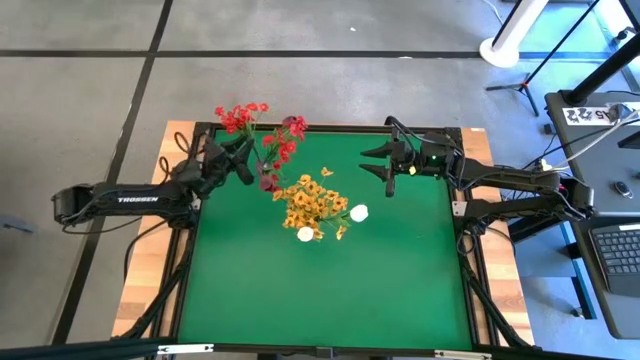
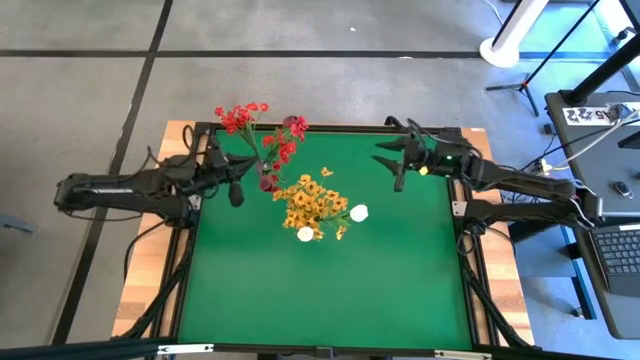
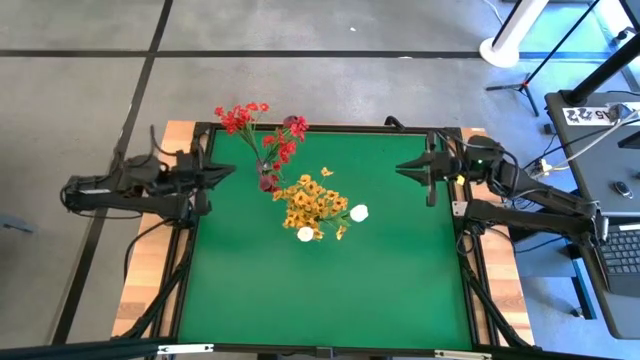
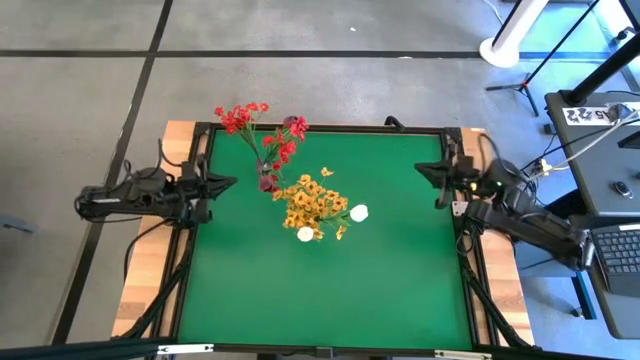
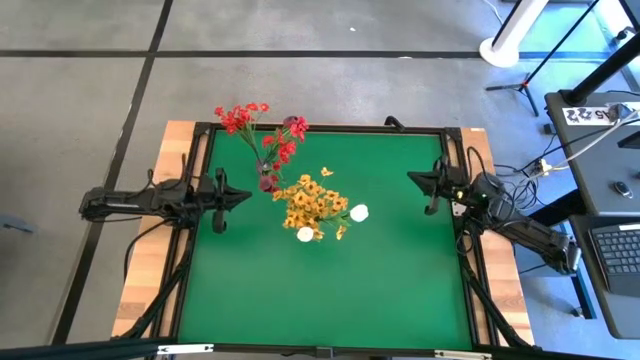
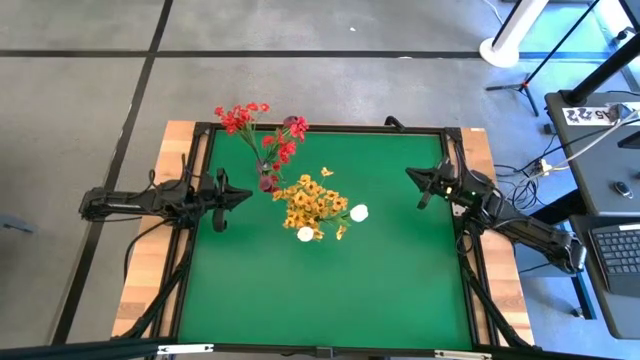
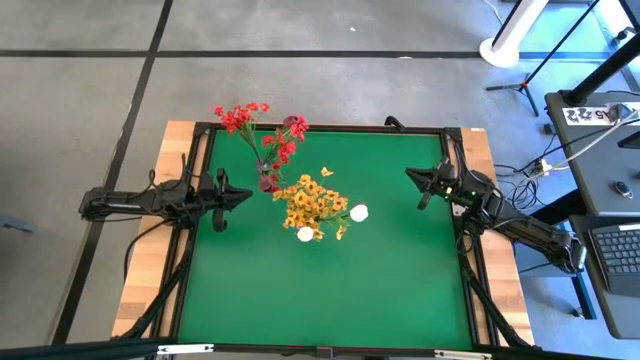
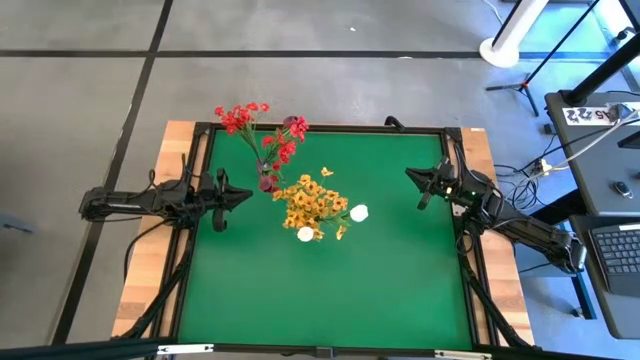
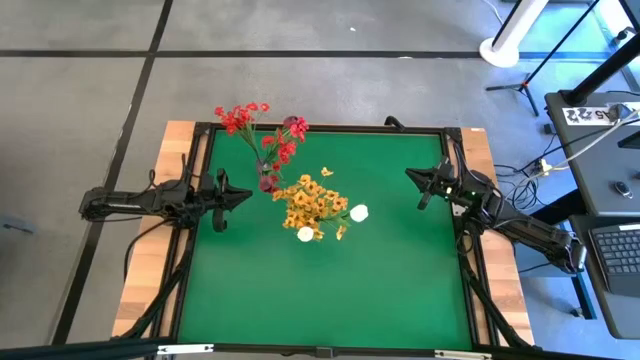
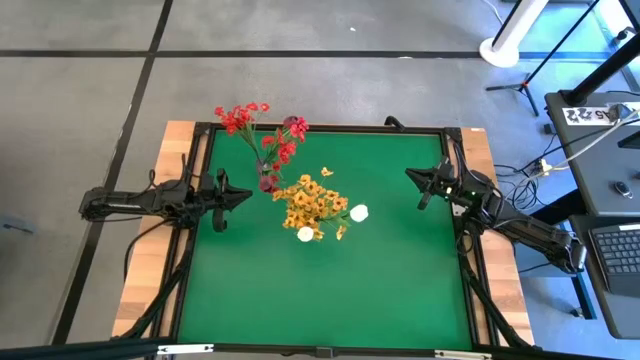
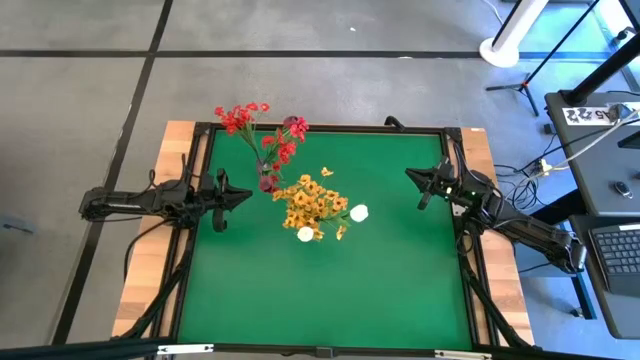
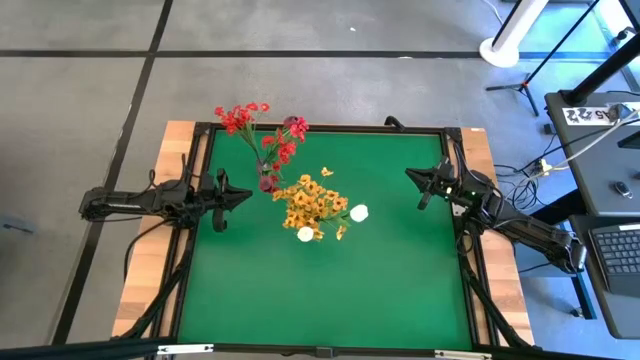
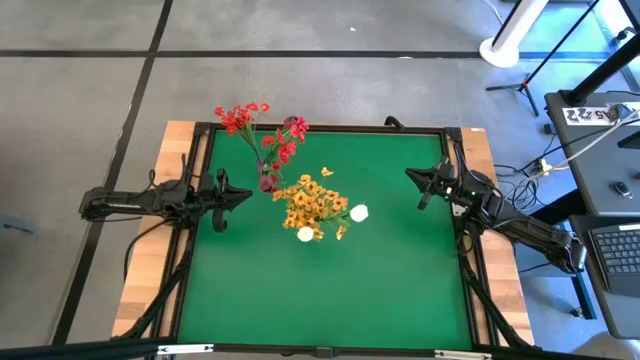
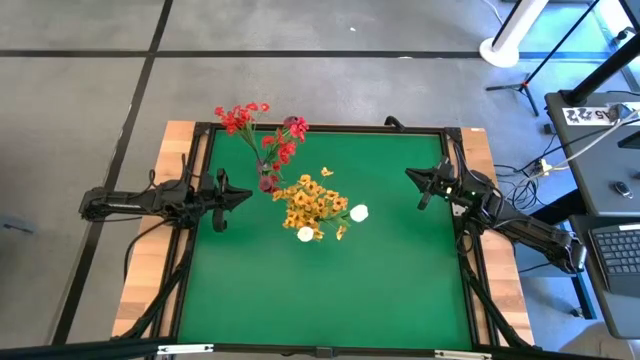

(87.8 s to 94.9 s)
Task: Sort flowers into vase by color
Return to Home Position

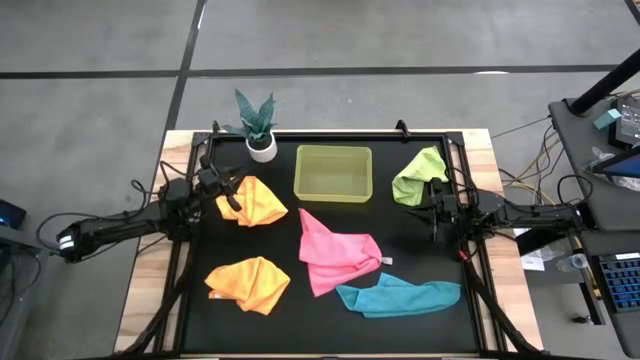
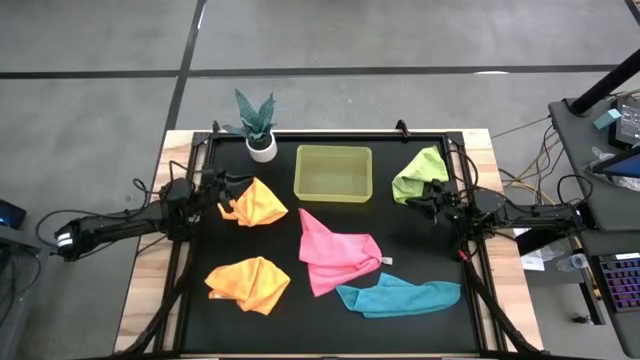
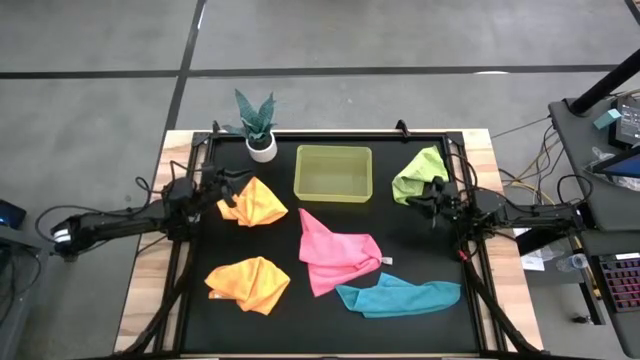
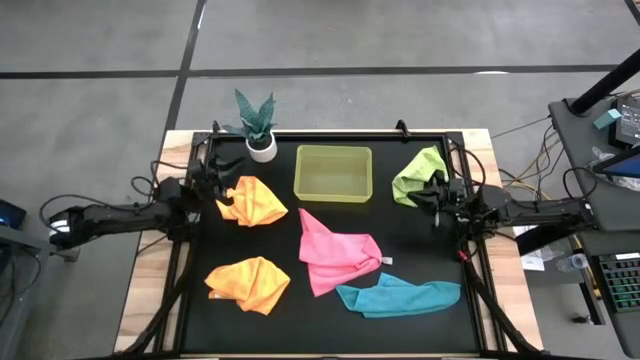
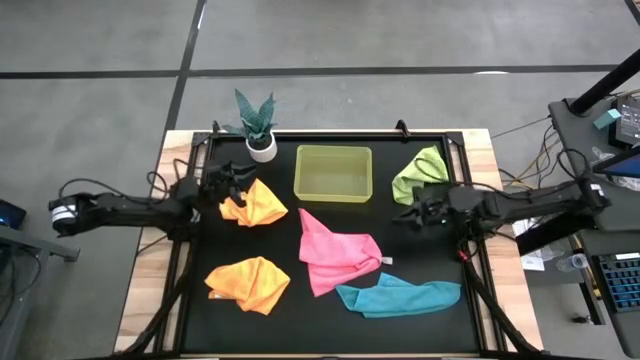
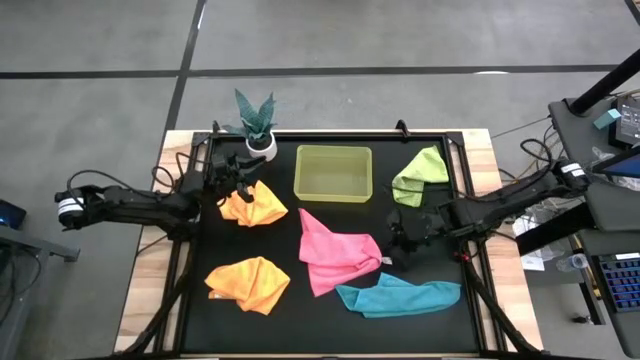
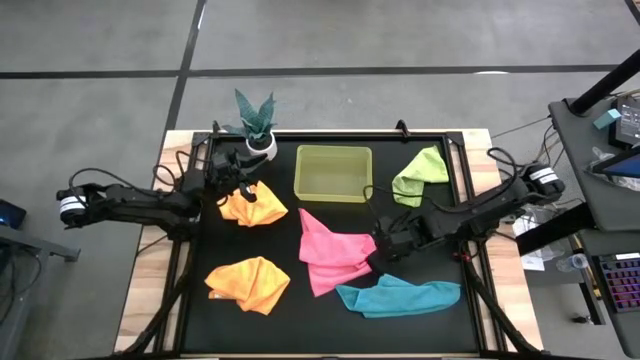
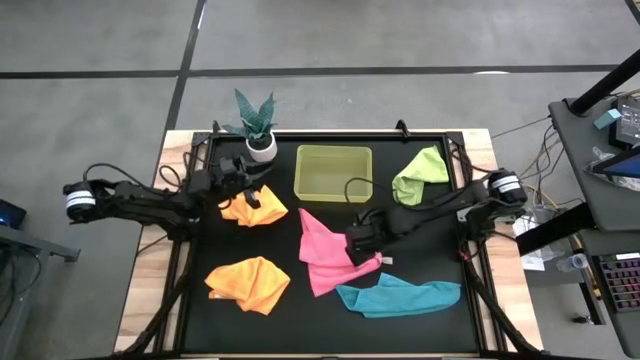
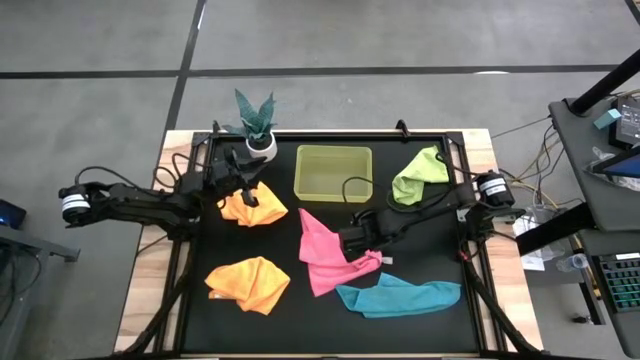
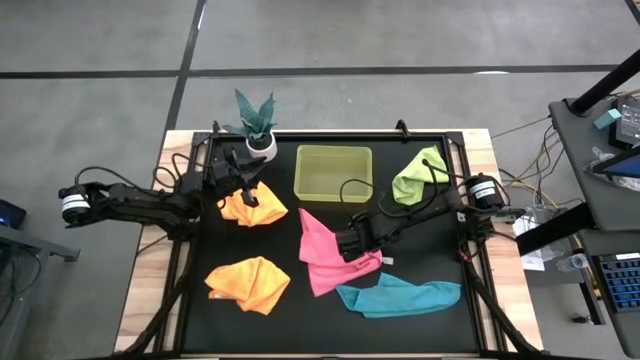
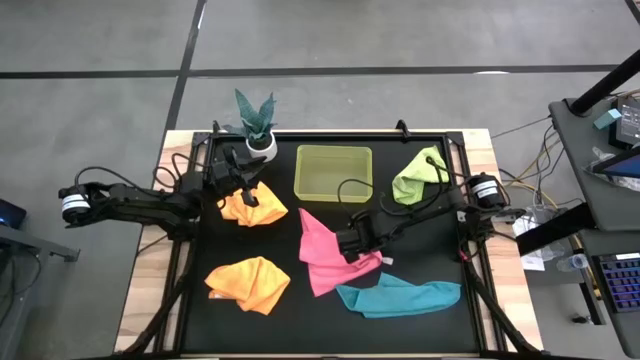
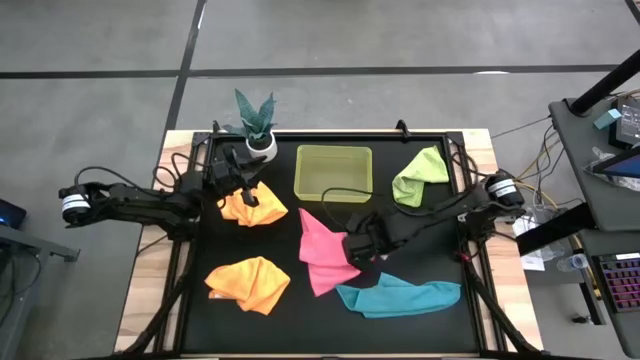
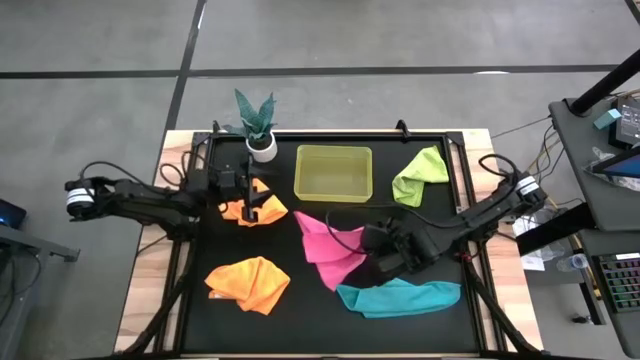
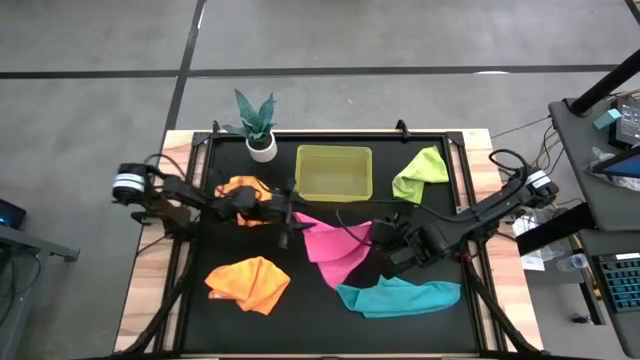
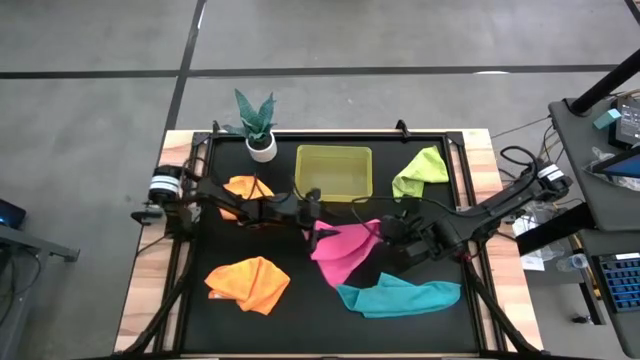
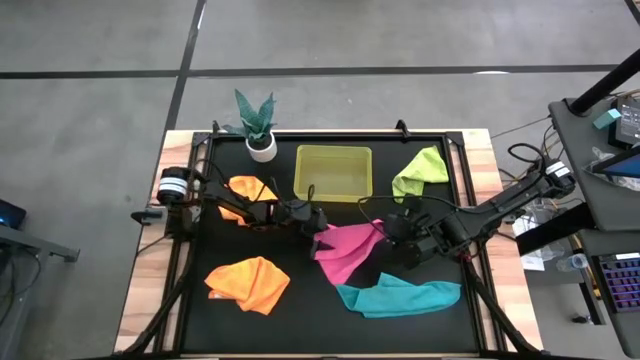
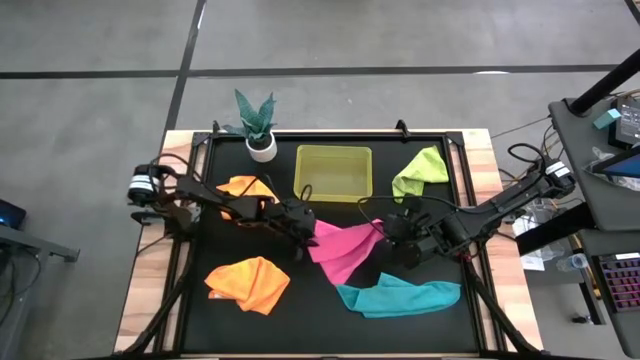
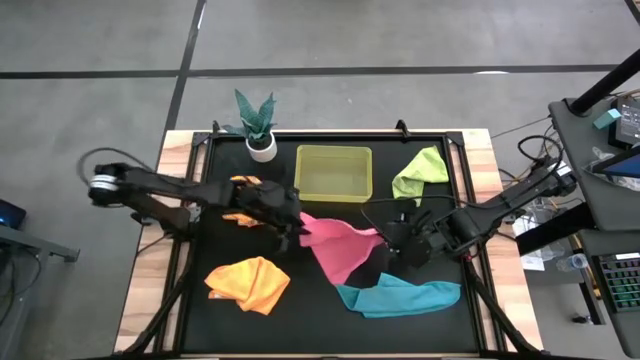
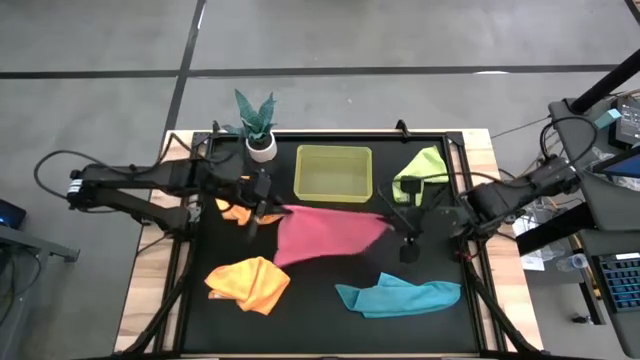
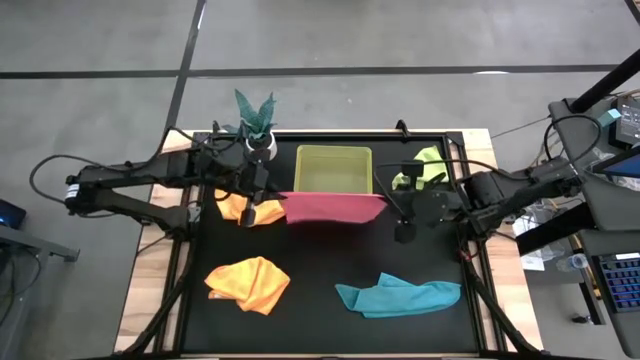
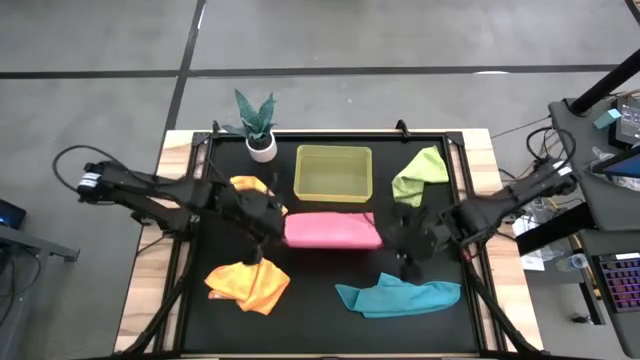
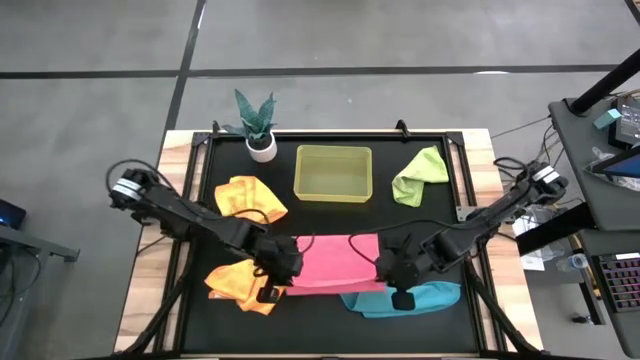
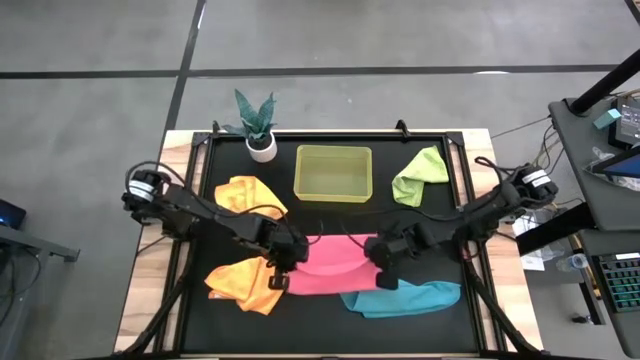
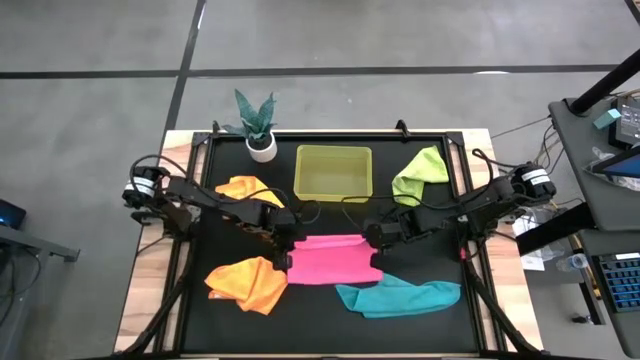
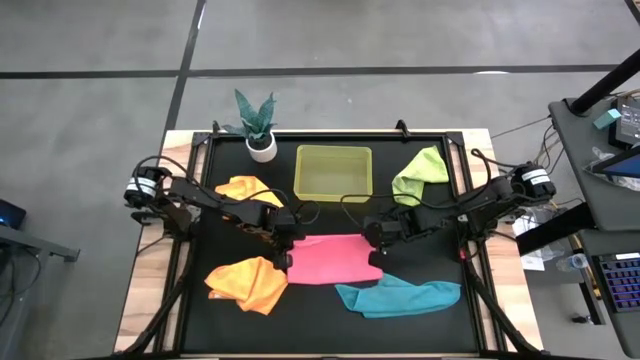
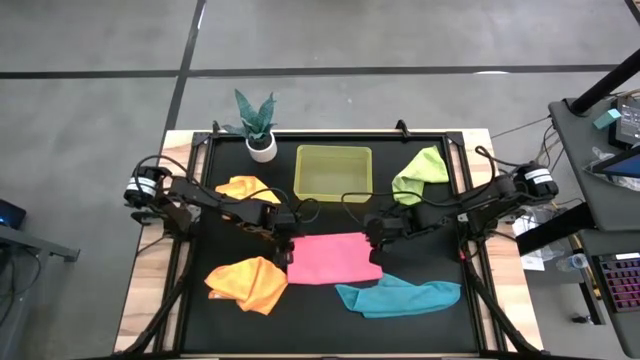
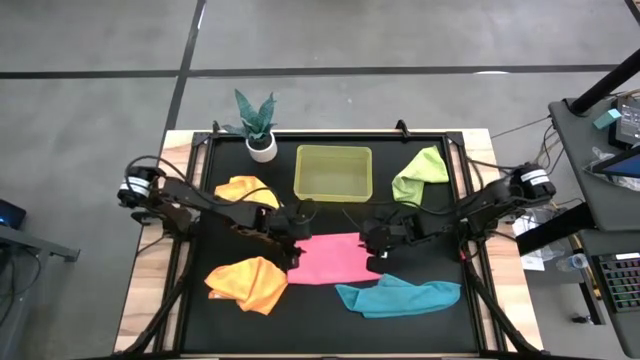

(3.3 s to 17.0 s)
Task: Fold microfiber towels
Fold the pink towel on the table
